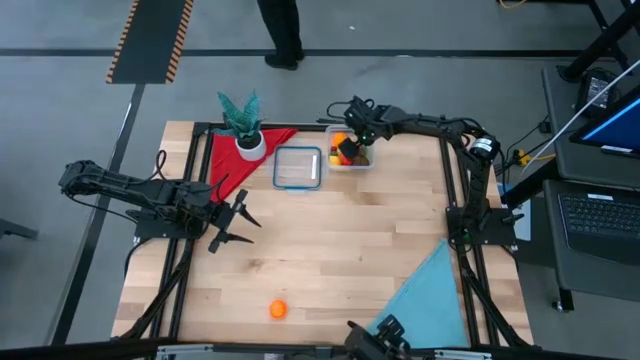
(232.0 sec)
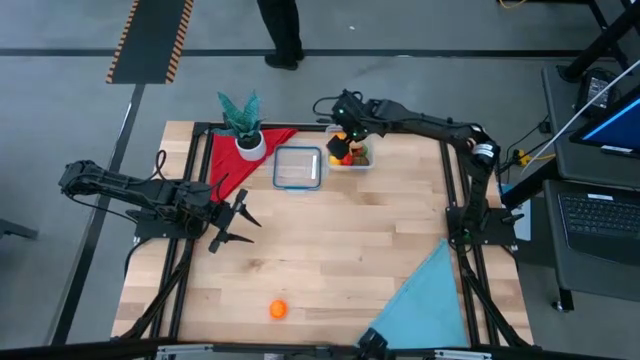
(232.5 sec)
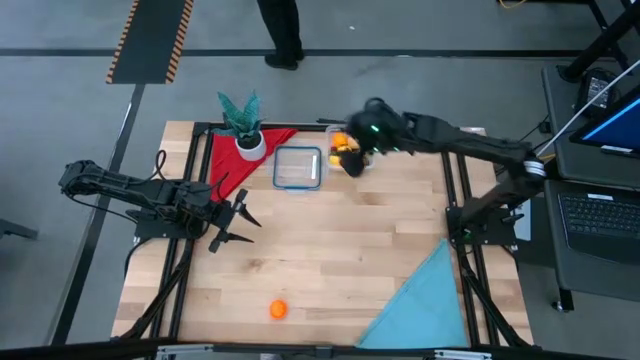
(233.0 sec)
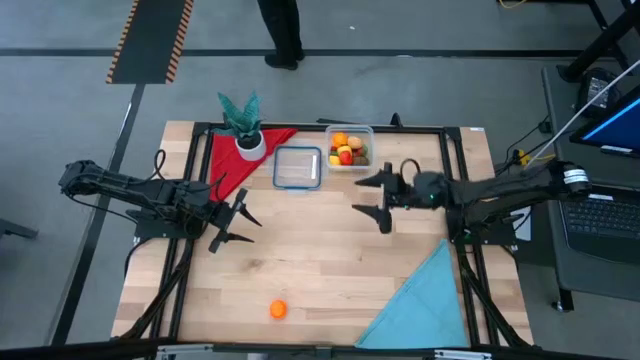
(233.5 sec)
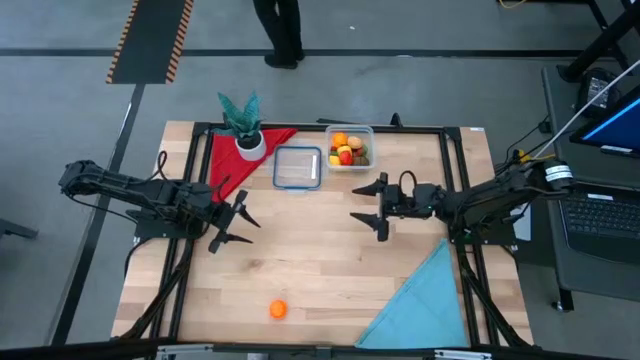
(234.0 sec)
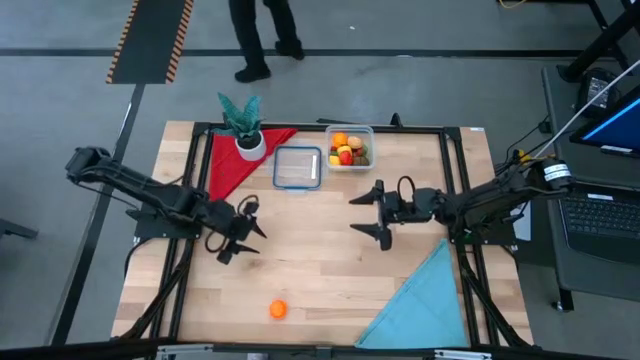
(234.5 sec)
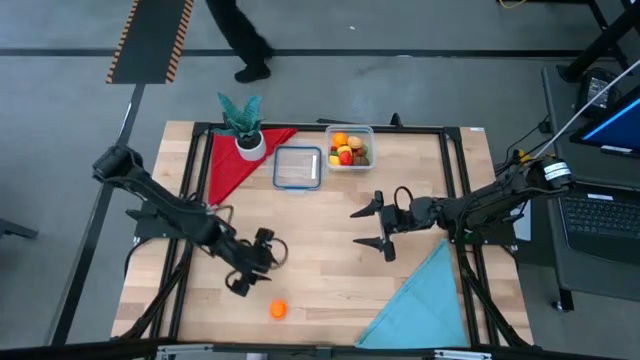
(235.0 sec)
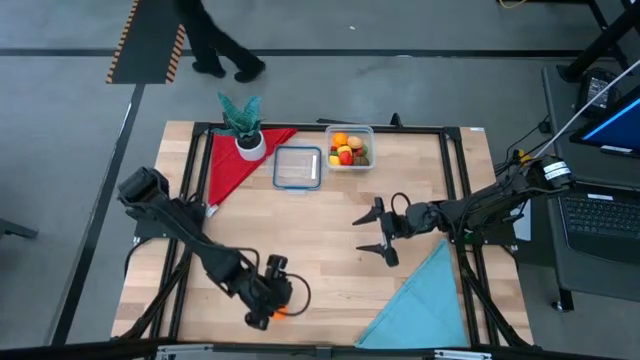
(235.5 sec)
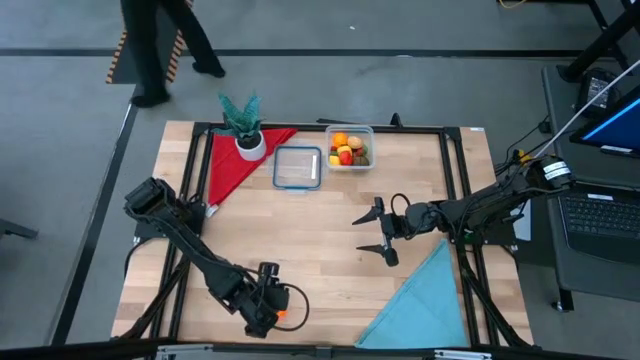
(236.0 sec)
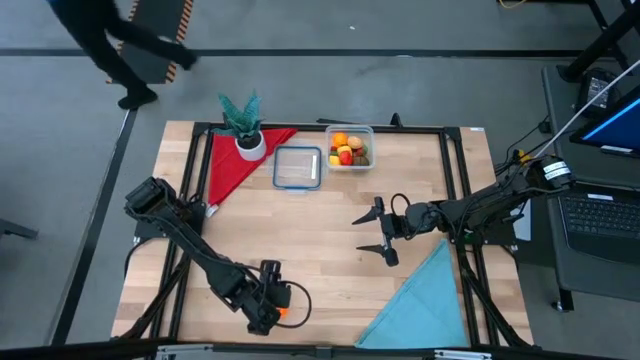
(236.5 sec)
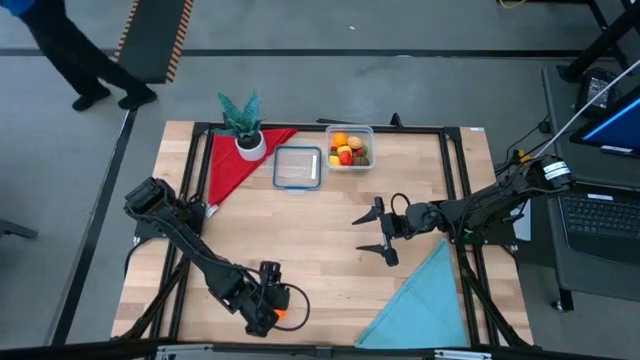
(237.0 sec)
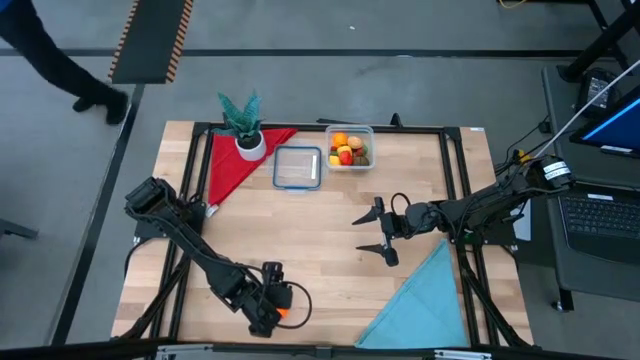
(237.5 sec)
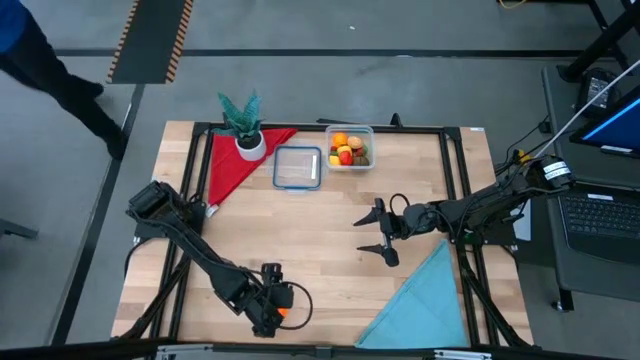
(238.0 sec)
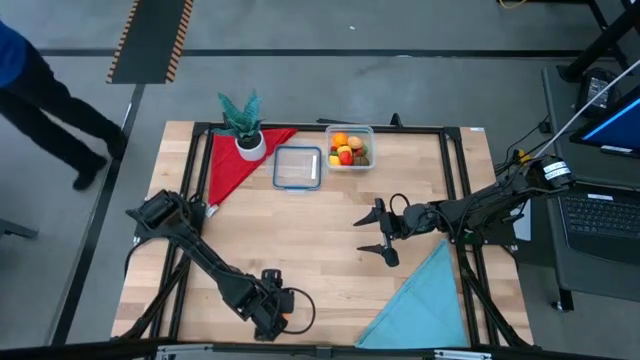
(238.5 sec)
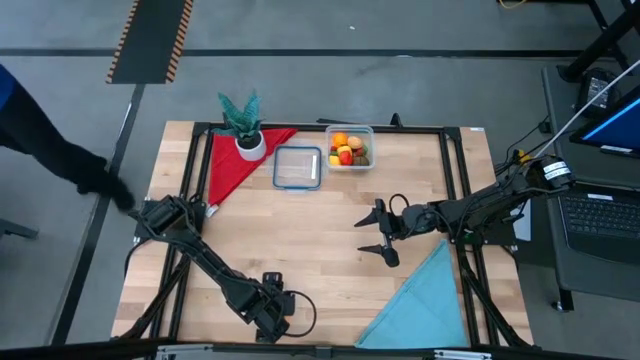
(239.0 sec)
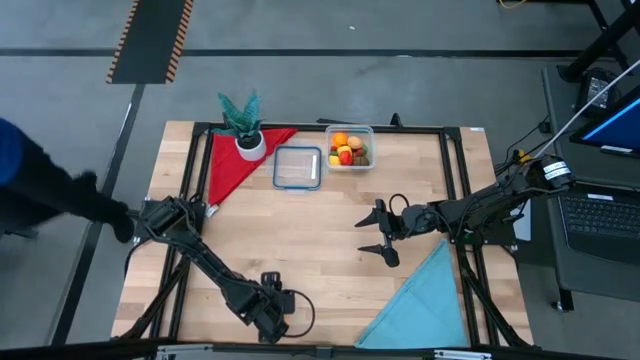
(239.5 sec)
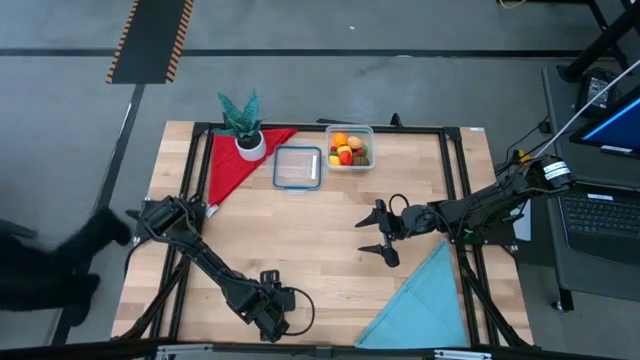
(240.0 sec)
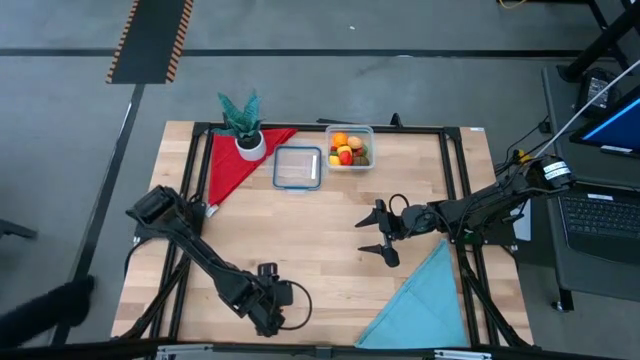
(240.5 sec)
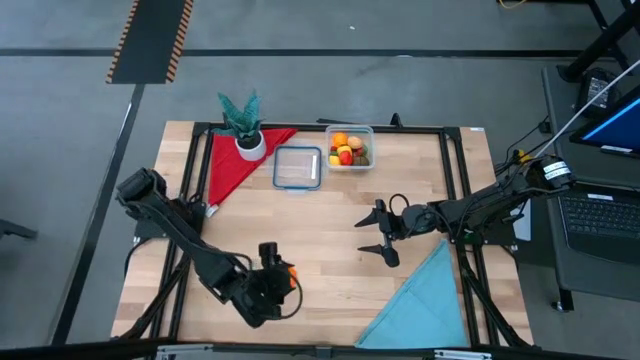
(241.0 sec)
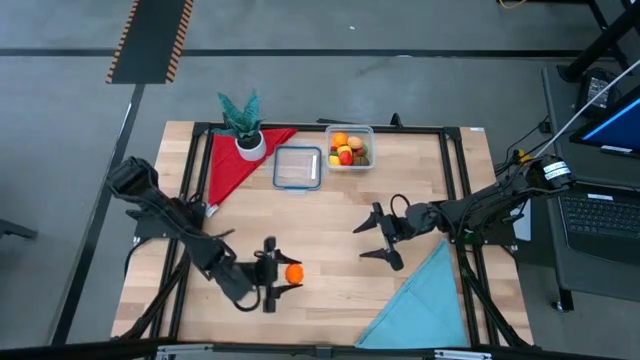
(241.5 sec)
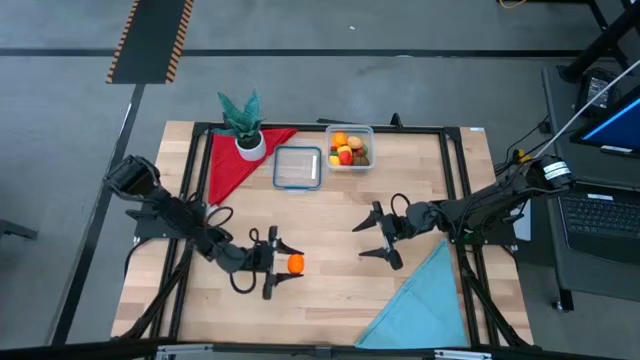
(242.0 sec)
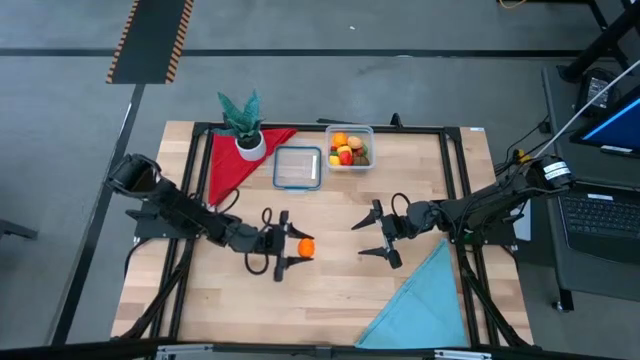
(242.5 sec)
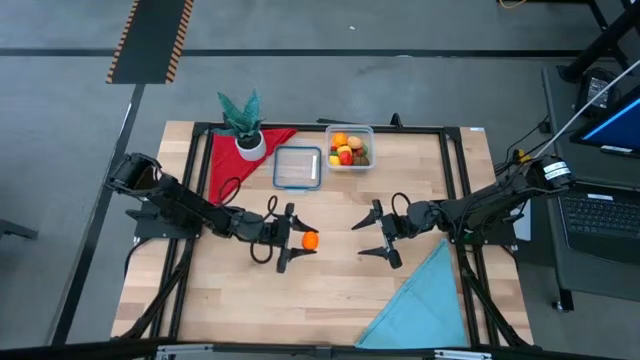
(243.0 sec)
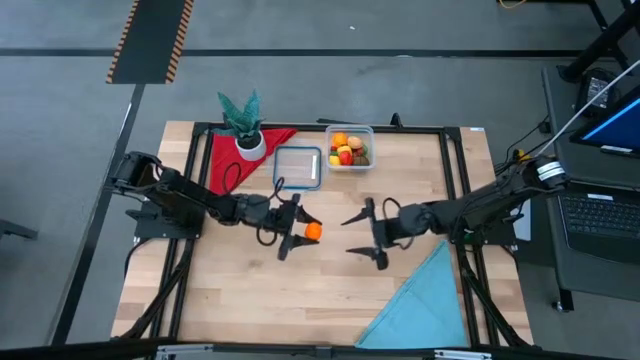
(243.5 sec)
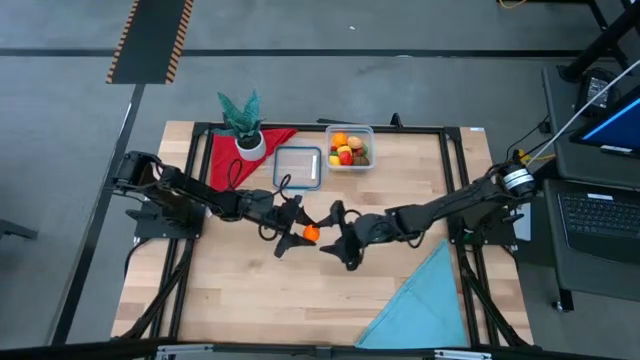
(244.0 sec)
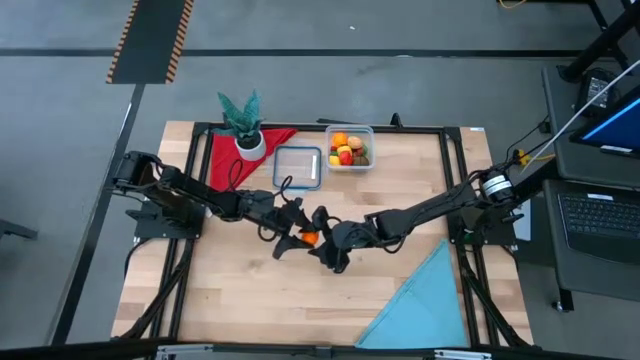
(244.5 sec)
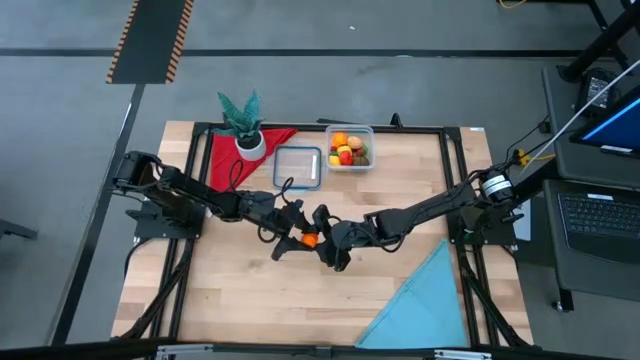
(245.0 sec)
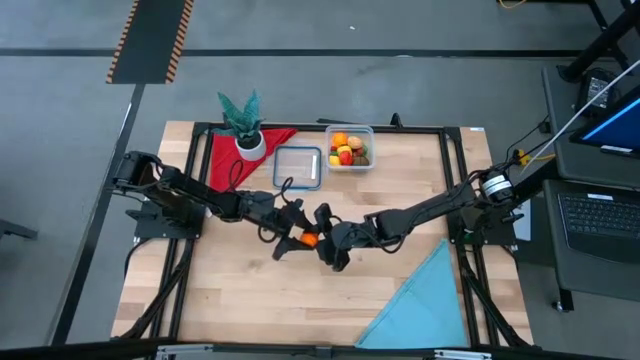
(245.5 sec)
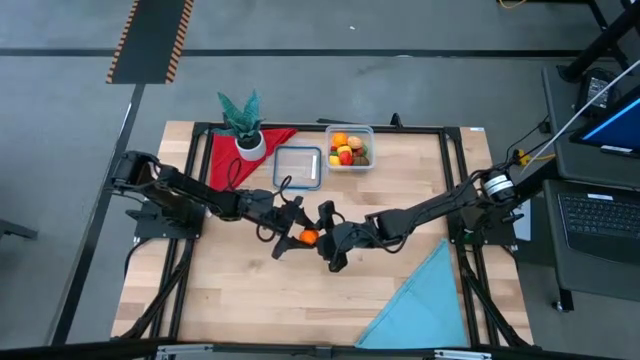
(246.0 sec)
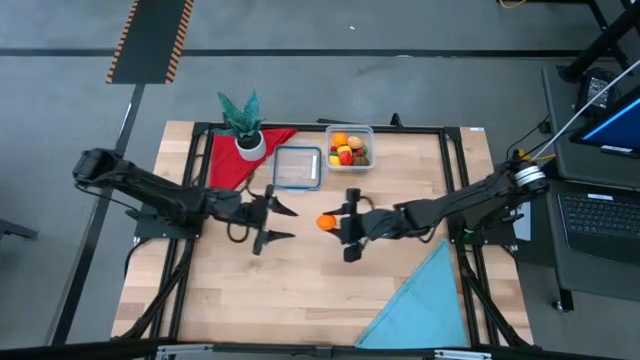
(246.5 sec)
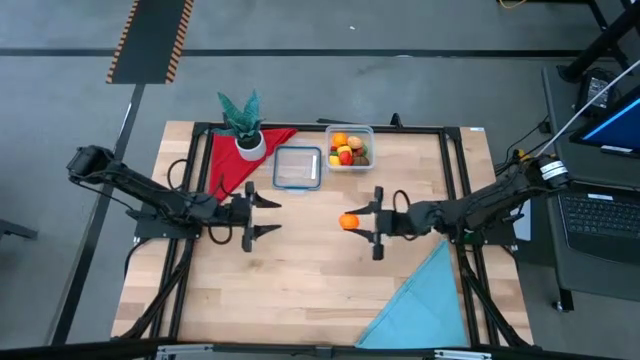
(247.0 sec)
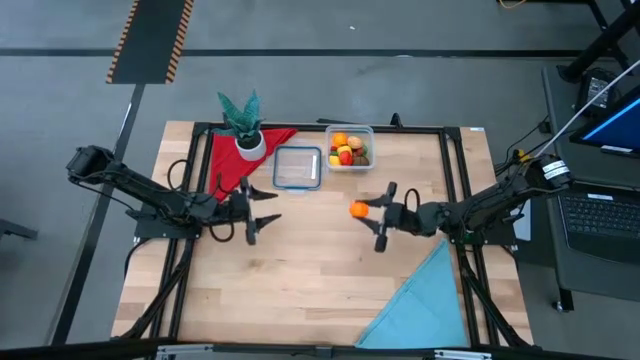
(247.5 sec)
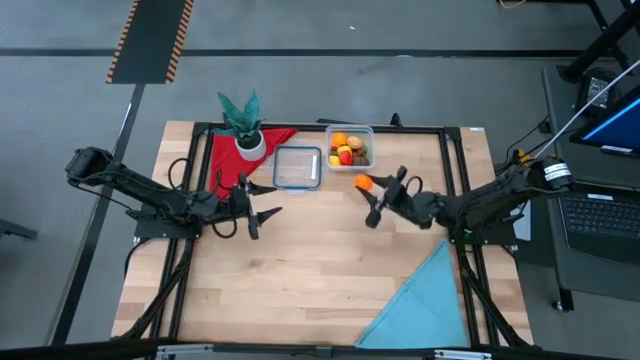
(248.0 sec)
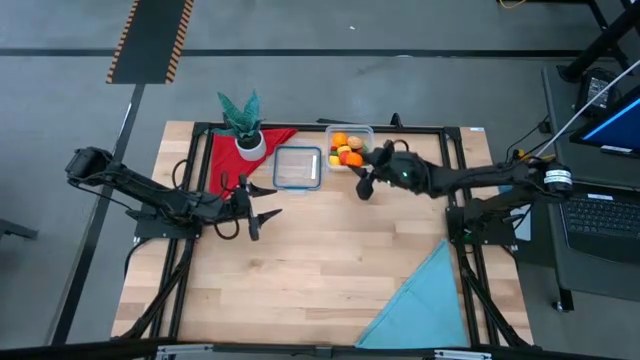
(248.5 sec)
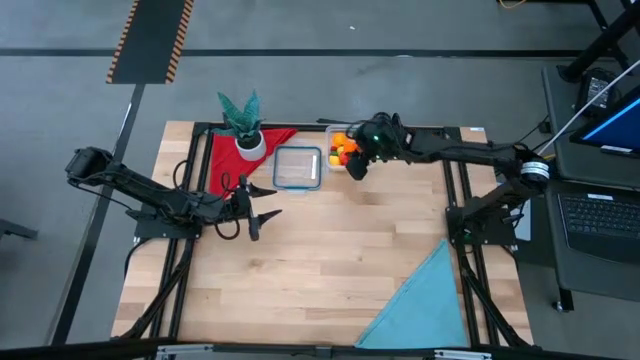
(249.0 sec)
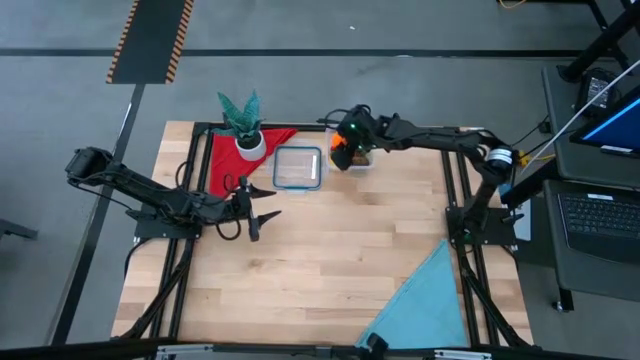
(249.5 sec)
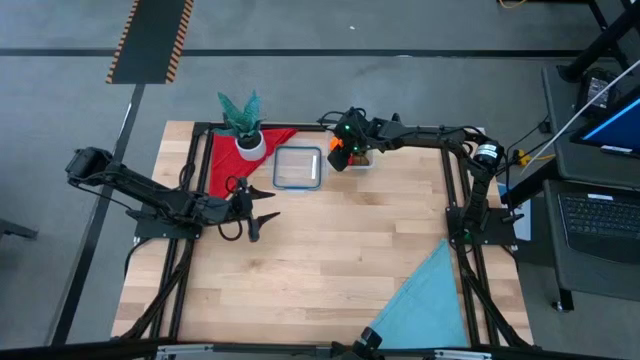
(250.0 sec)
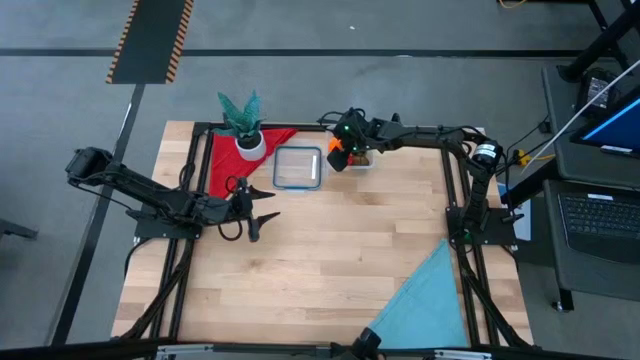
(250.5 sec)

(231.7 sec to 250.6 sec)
Task: Pick and placing Produce into tupperware
Put the pumpkin into the transparent bin

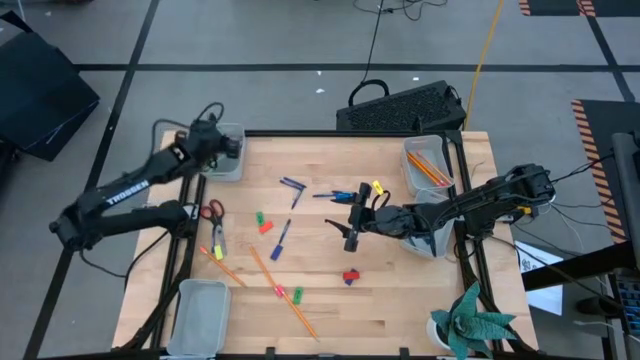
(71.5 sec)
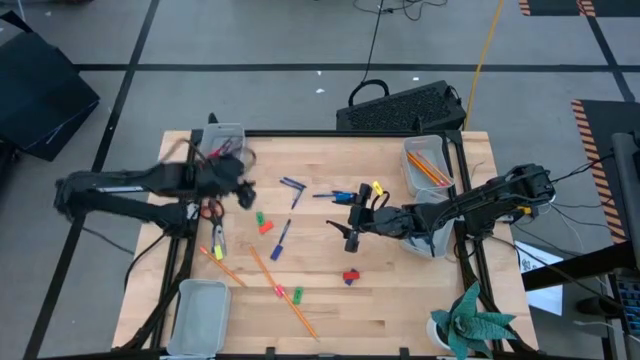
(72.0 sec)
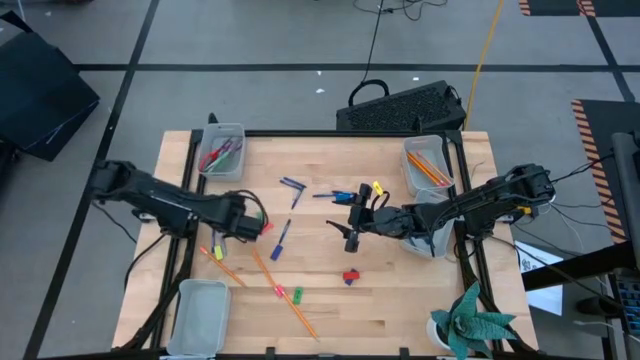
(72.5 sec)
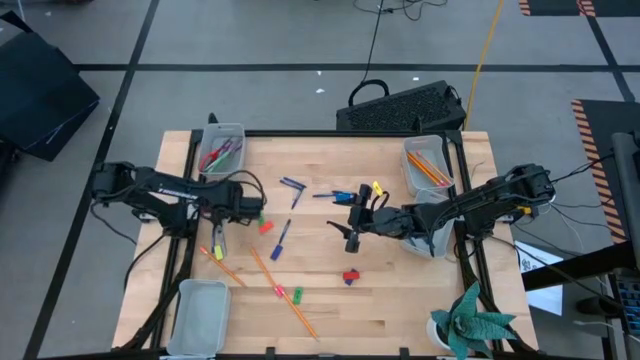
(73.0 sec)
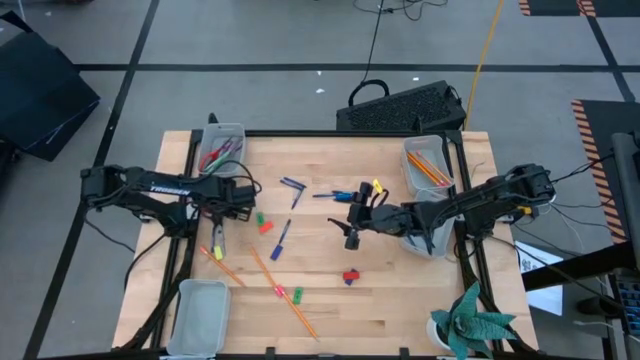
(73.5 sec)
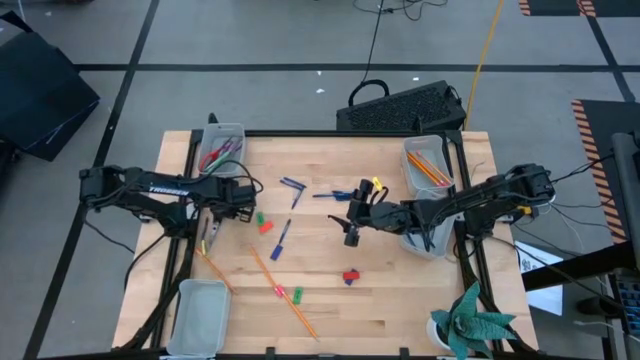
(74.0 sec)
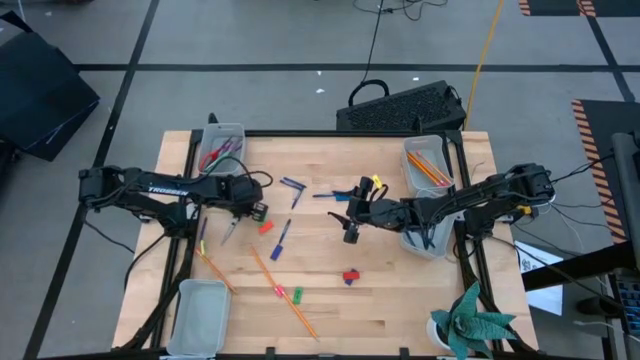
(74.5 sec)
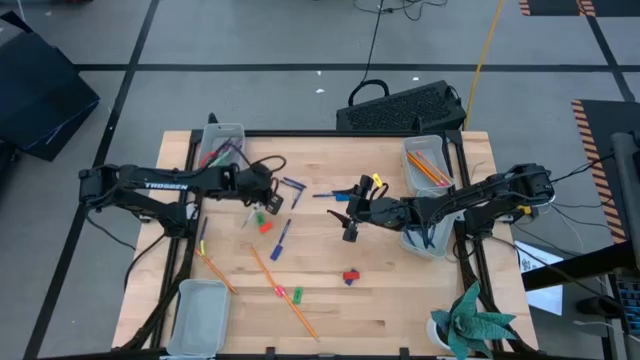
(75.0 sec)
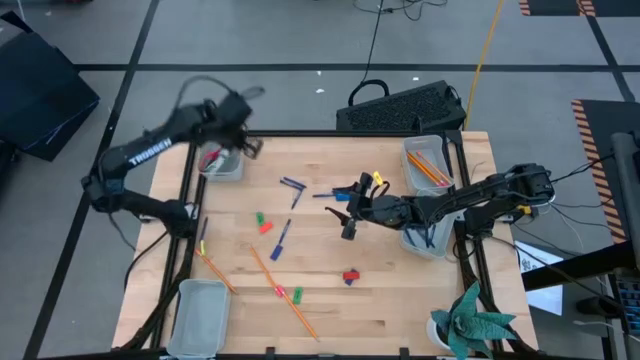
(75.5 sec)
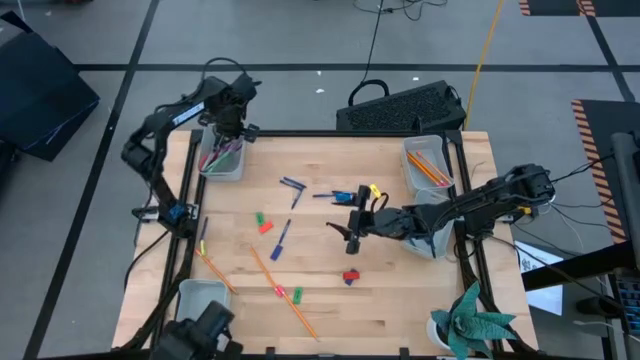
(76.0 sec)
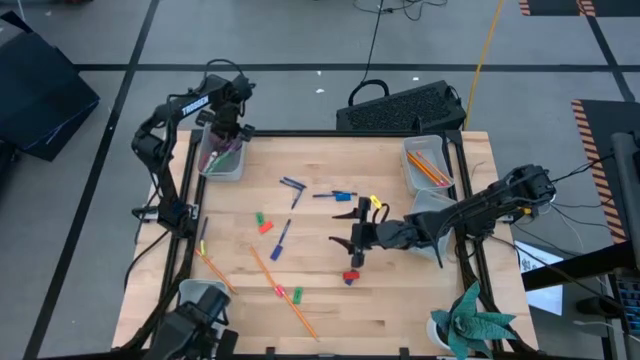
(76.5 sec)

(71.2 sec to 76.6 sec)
Task: Sort crayons/erasers/pens/pencils in bins
Put the black scissor into the top left gray bin
